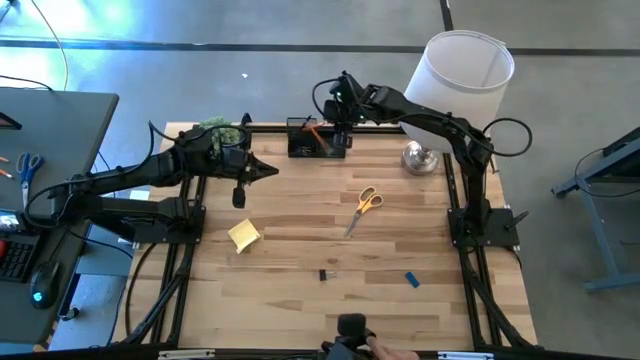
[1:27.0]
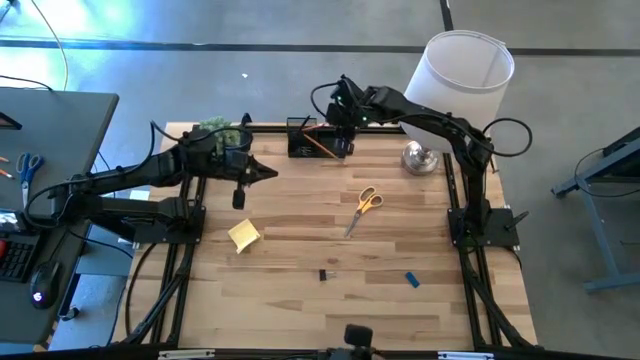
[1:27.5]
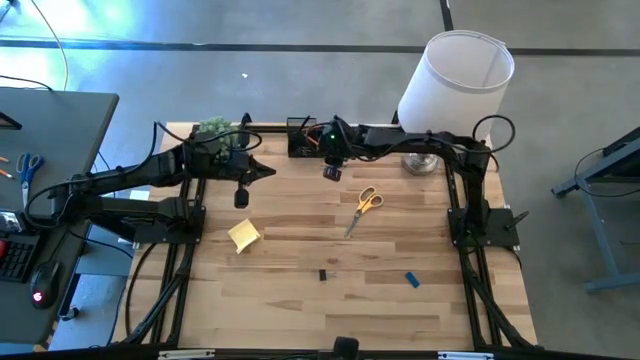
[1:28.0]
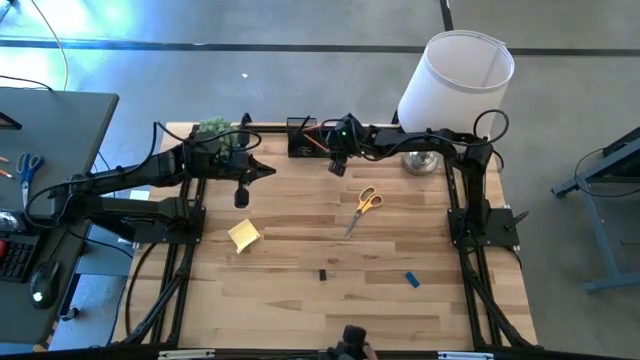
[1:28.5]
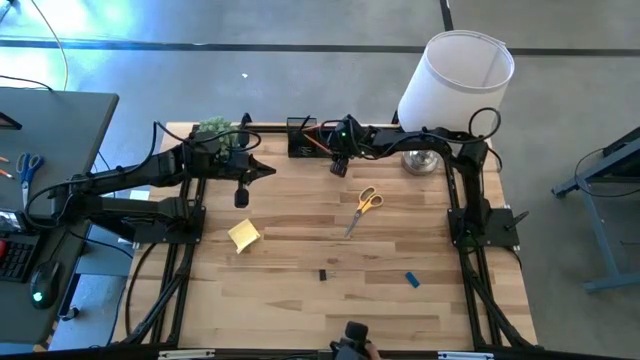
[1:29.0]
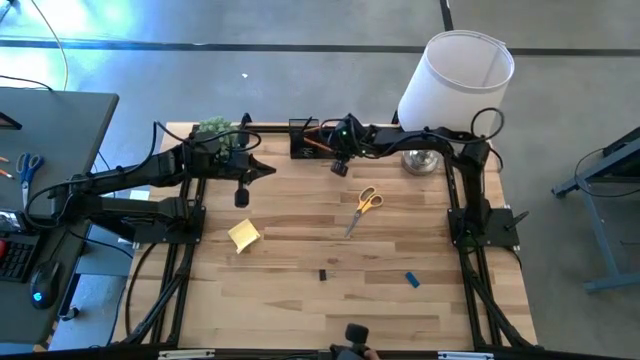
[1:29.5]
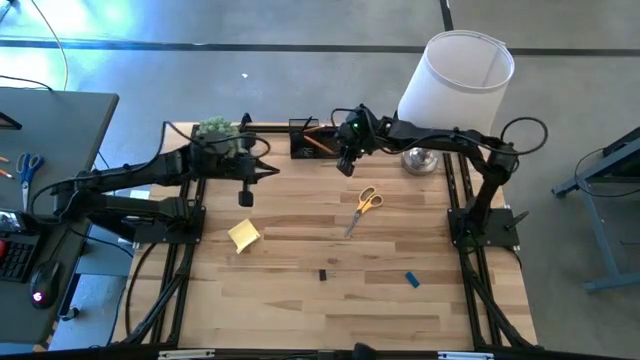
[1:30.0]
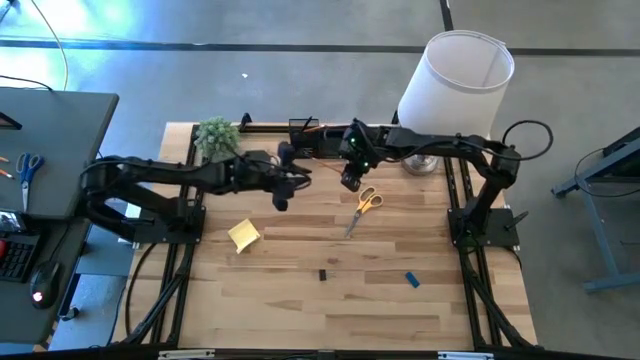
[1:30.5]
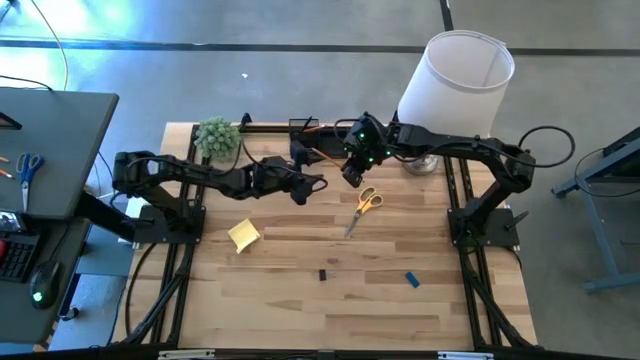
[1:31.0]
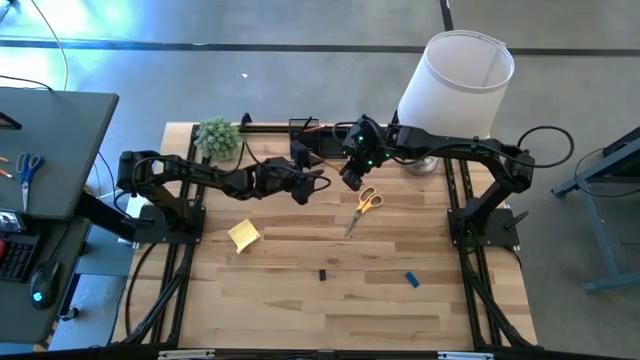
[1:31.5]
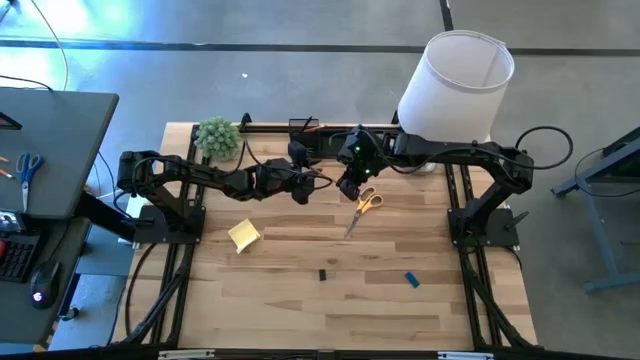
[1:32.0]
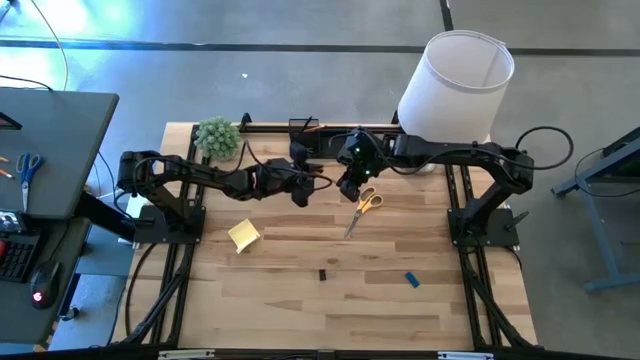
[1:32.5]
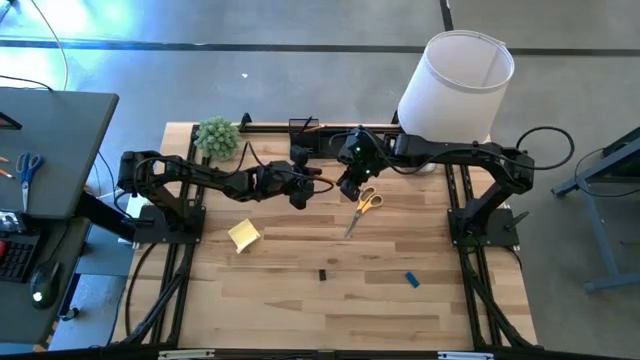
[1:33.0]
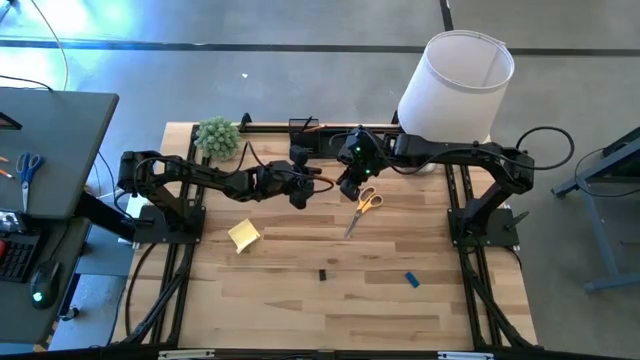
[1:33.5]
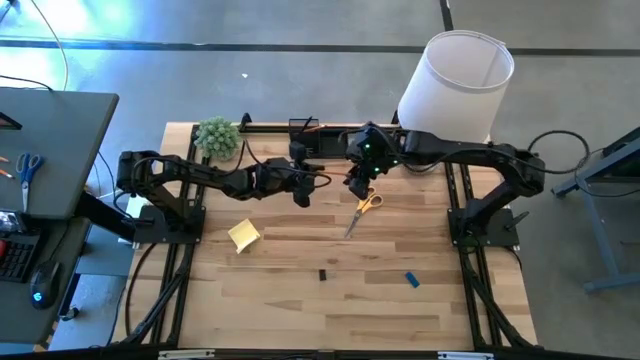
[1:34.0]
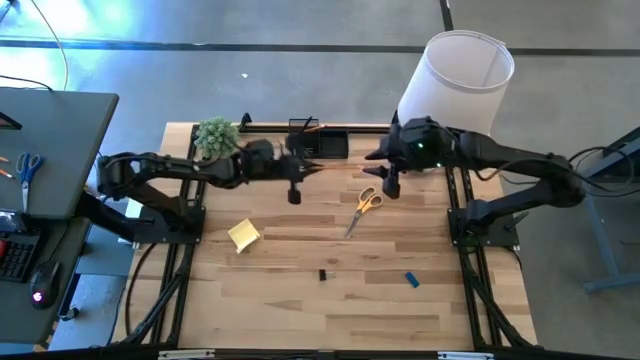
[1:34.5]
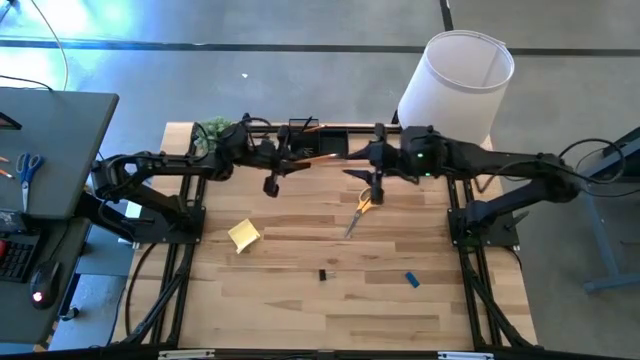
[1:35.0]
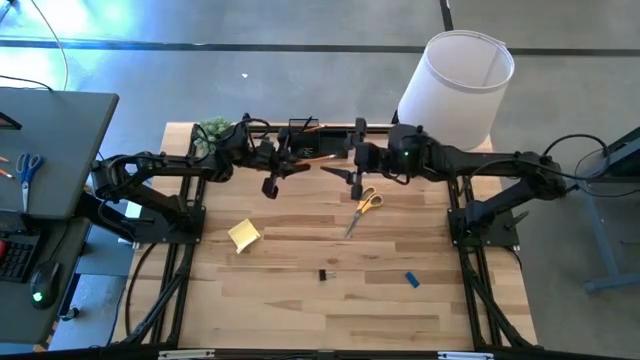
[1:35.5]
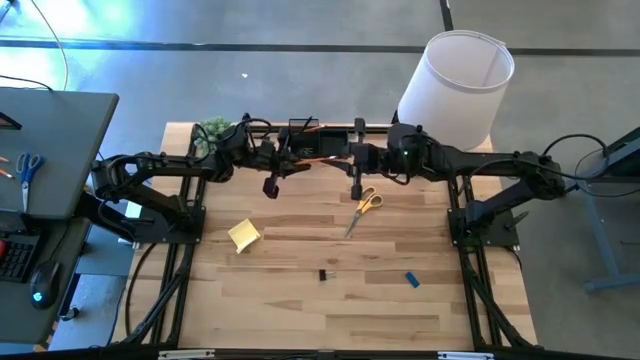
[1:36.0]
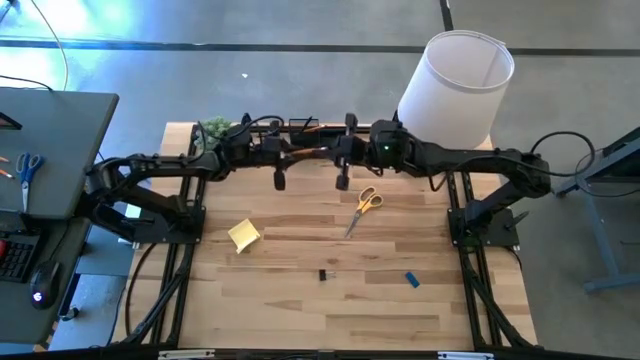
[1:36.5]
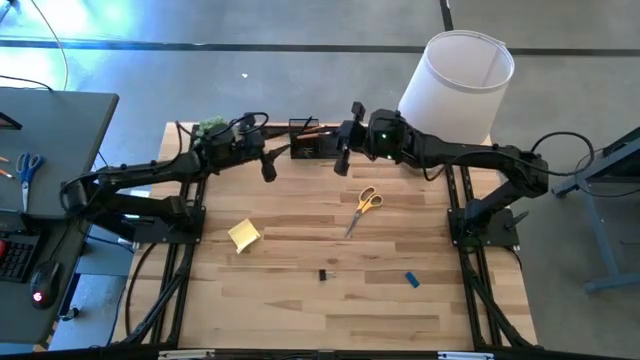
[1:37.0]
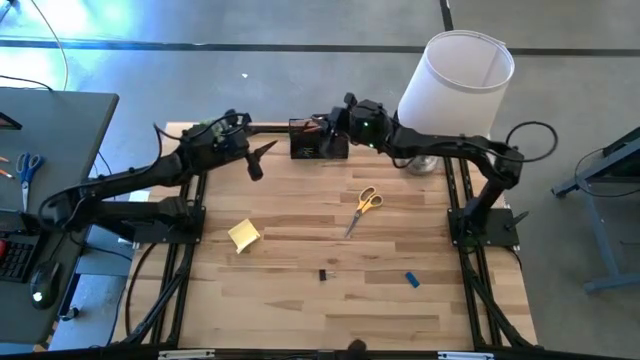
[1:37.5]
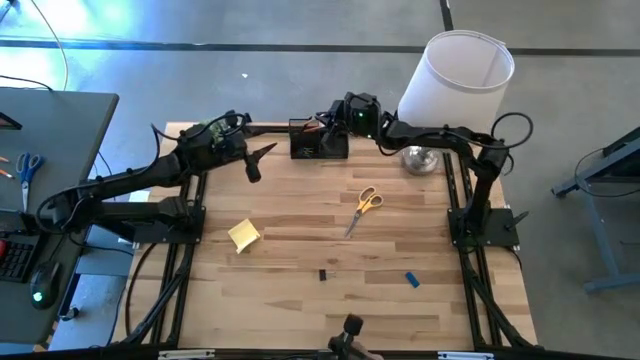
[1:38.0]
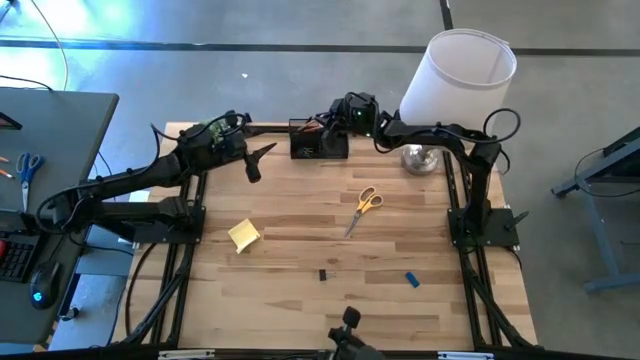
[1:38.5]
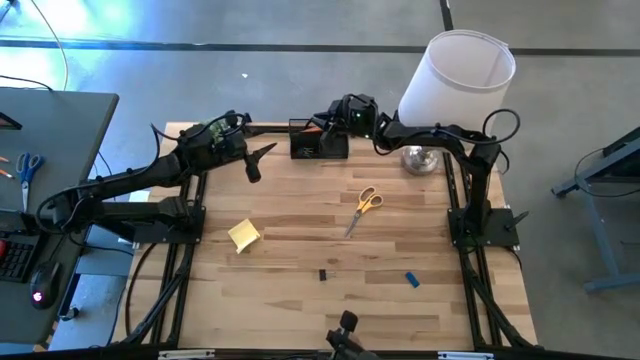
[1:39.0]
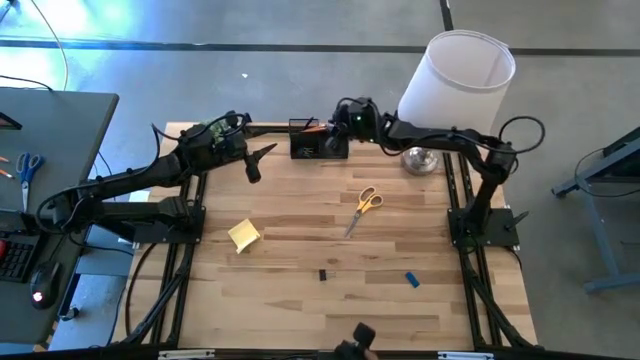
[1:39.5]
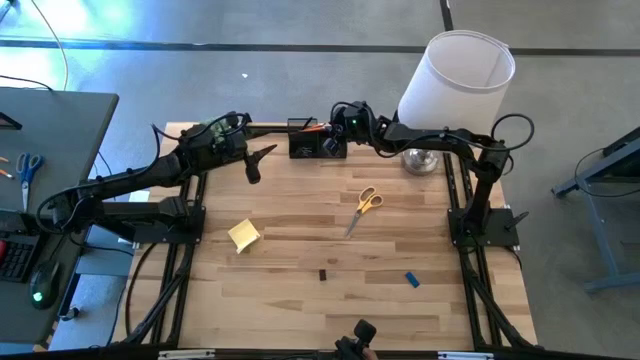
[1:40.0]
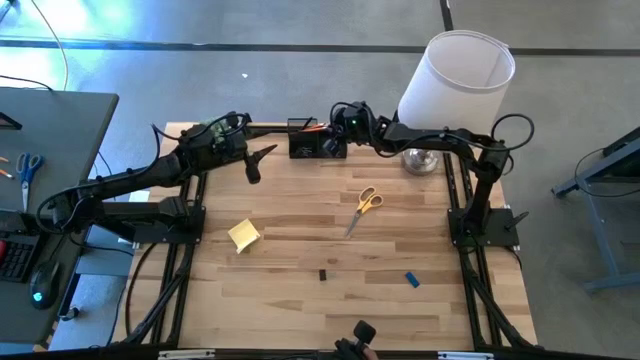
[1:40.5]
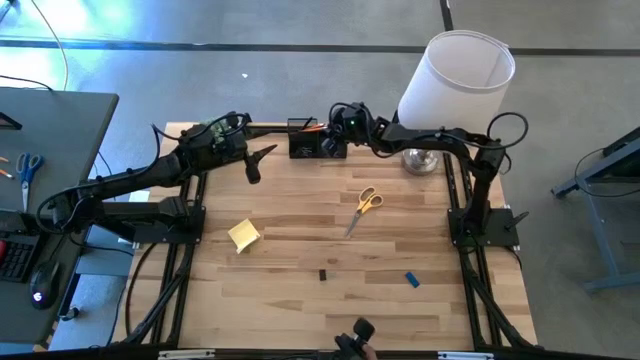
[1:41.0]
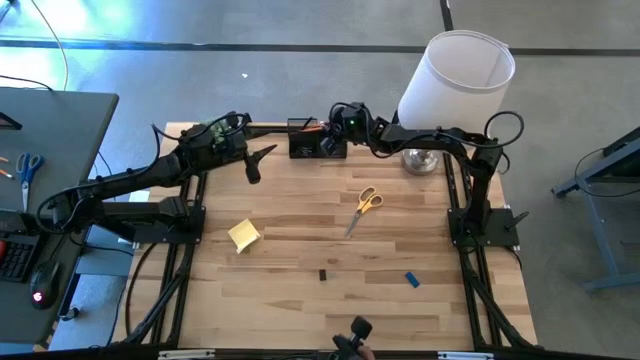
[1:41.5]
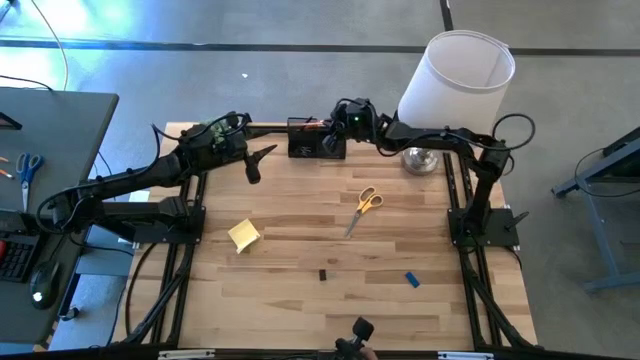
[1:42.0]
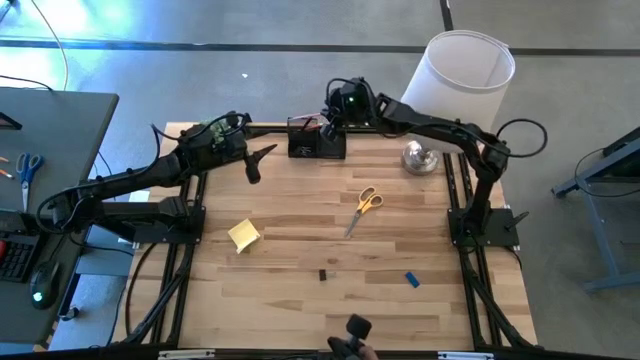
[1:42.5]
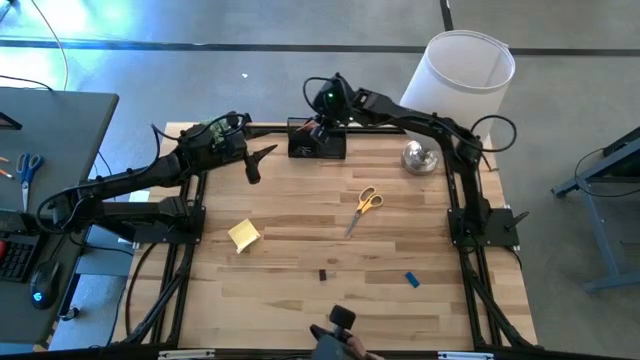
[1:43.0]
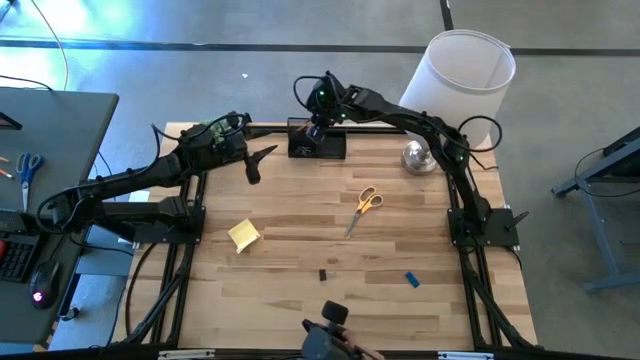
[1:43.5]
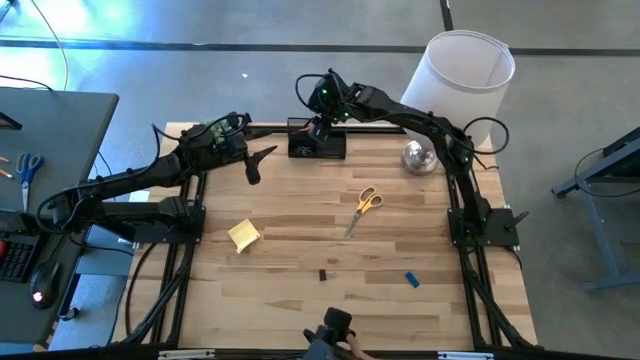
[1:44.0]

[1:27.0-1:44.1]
Task: Pick and place office supplies into organizer
Put the orange pencil into the top left slot of the desk organizer

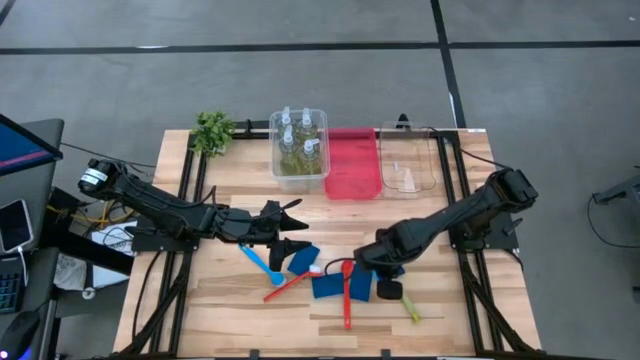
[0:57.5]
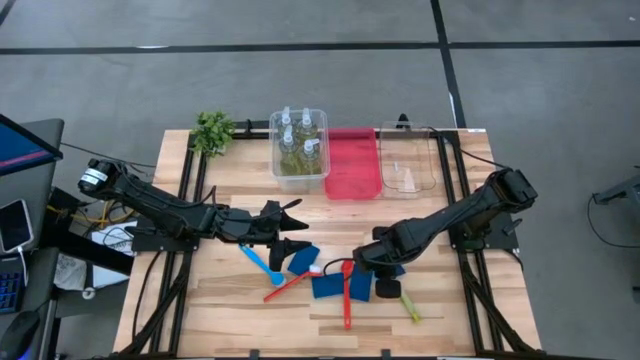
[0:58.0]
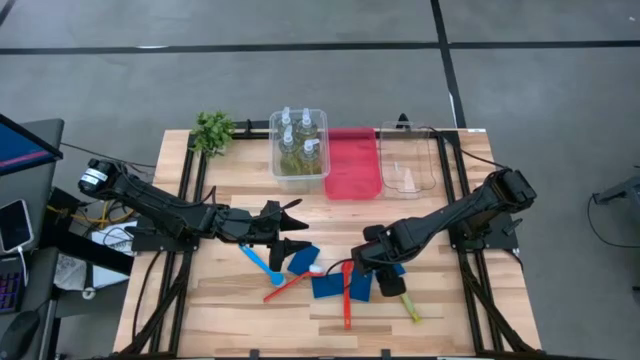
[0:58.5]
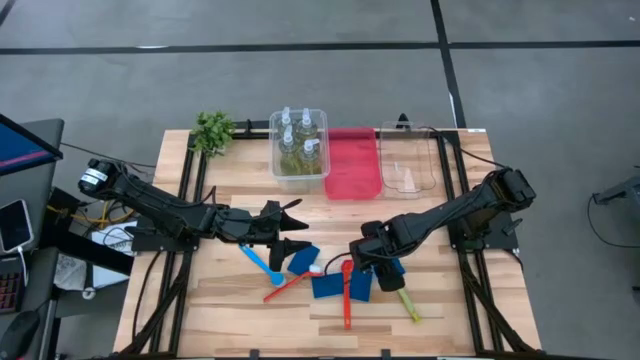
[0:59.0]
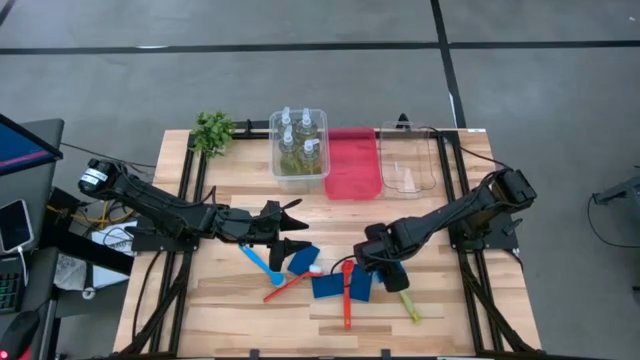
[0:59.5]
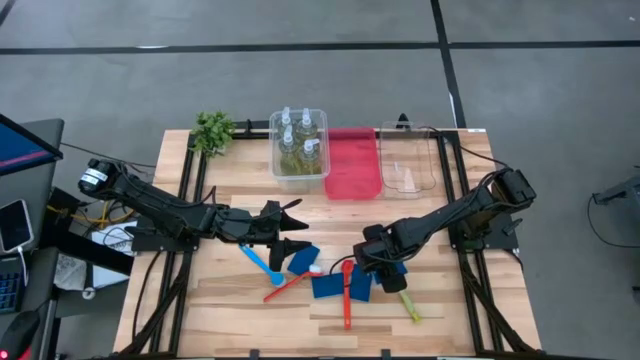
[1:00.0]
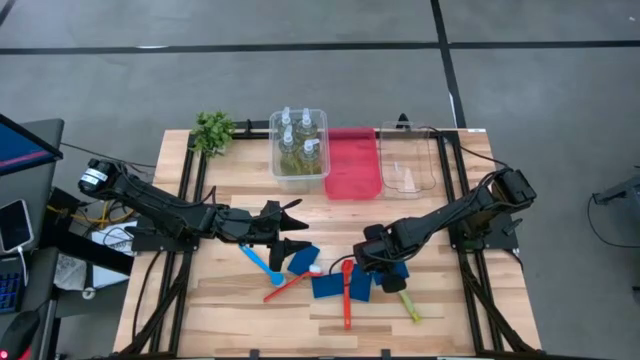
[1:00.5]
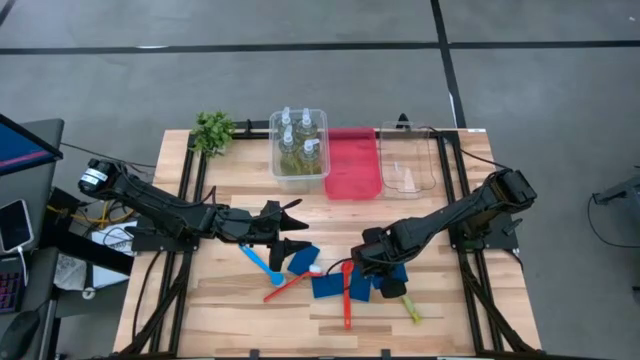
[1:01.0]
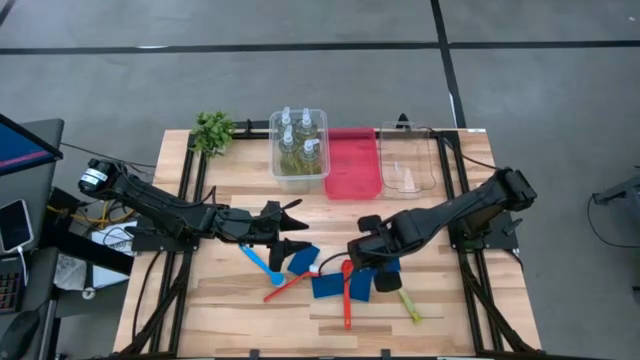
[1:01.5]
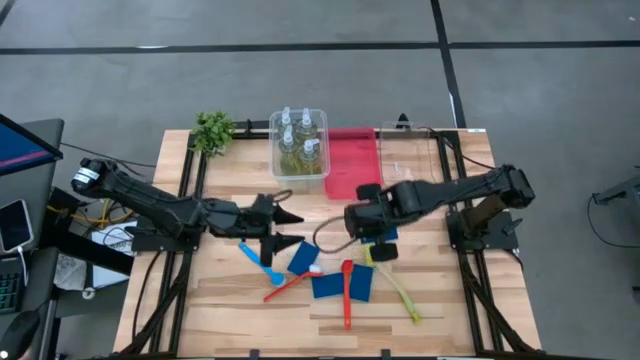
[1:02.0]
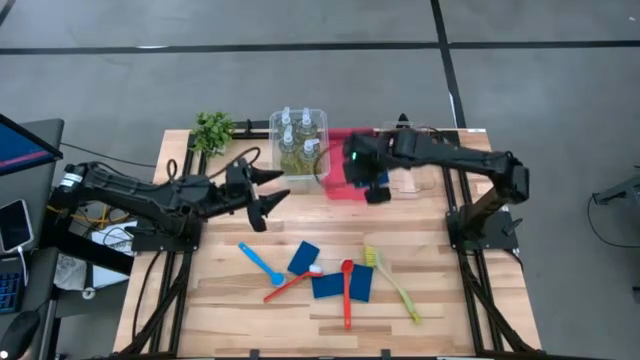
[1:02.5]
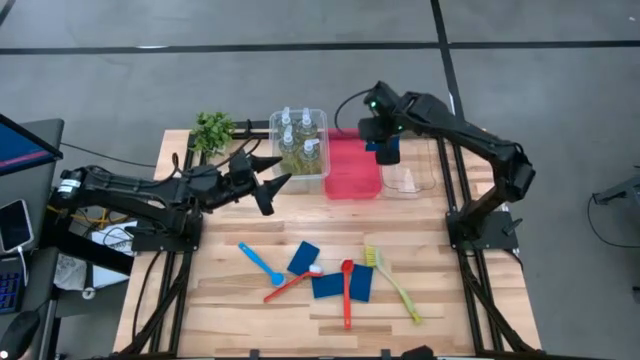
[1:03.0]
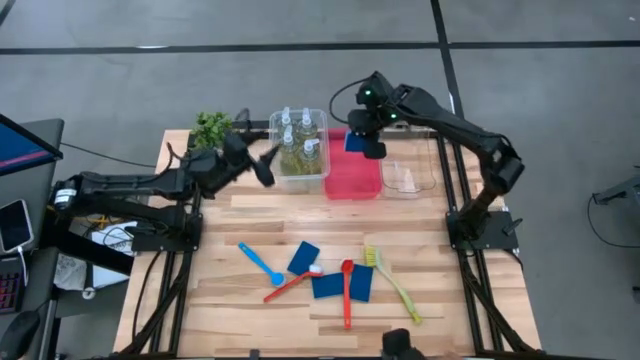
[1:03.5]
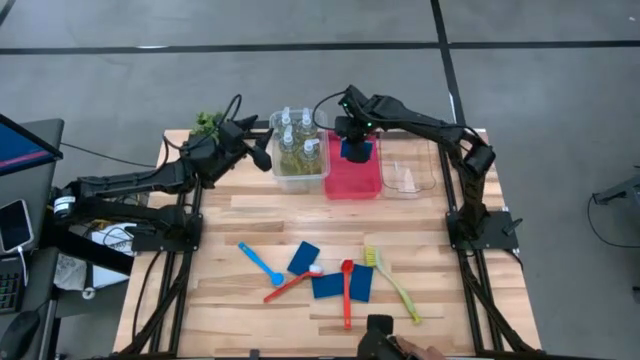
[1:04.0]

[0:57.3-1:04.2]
Task: Pick & Place Kitchen Sink Supplies
Put the blue sponge into the red bin
